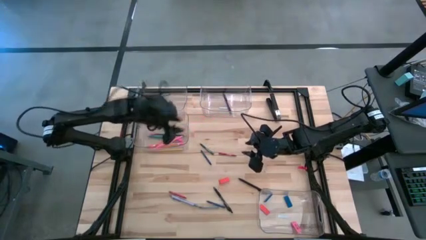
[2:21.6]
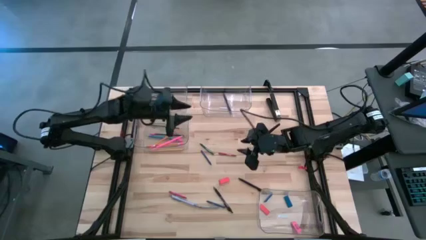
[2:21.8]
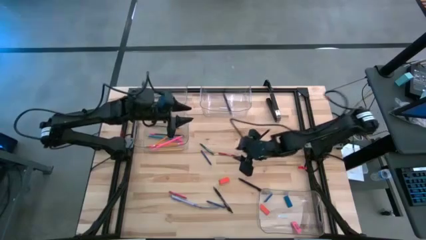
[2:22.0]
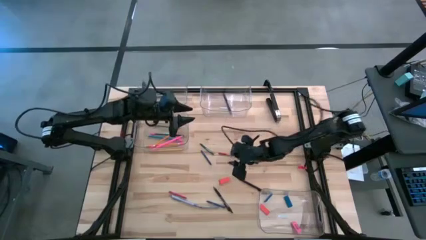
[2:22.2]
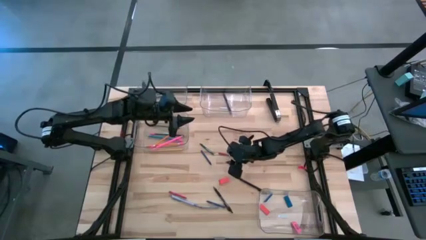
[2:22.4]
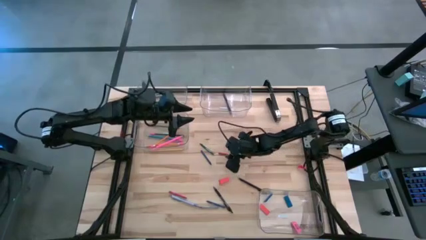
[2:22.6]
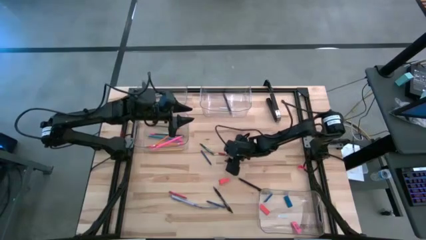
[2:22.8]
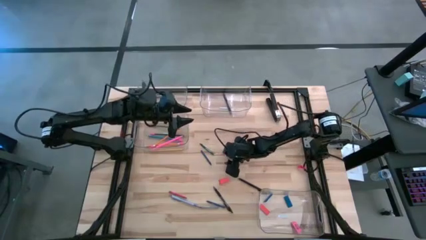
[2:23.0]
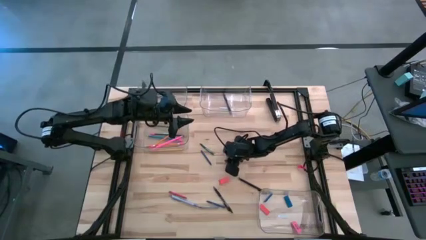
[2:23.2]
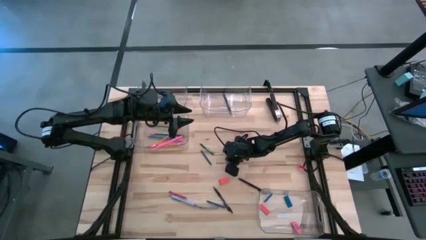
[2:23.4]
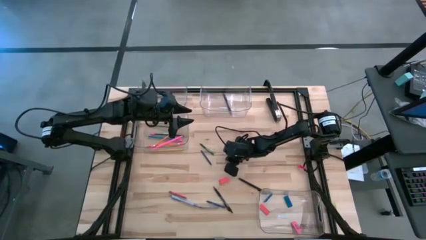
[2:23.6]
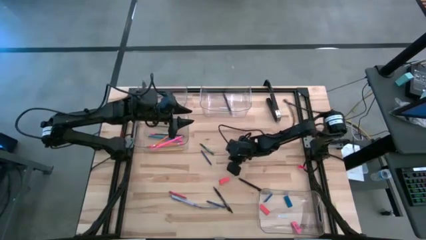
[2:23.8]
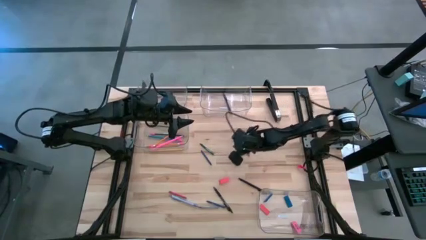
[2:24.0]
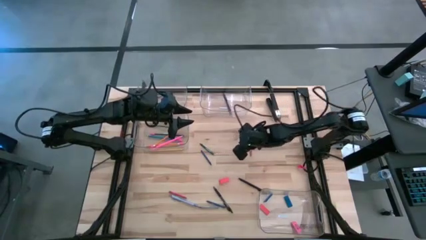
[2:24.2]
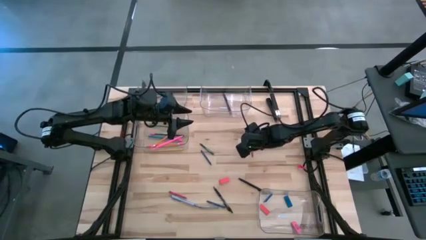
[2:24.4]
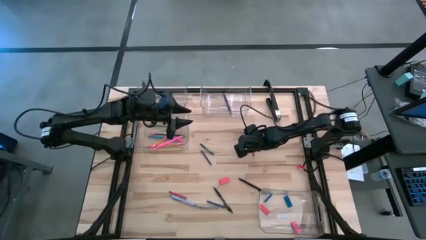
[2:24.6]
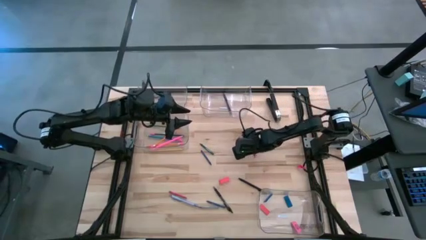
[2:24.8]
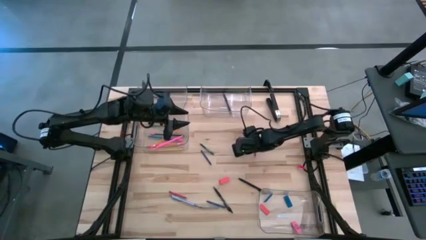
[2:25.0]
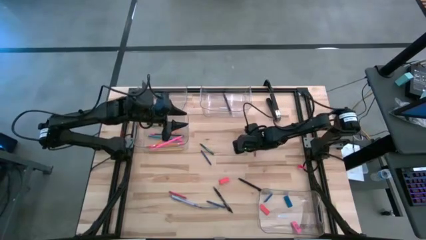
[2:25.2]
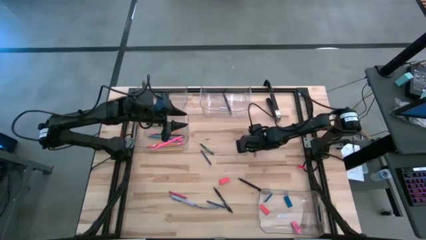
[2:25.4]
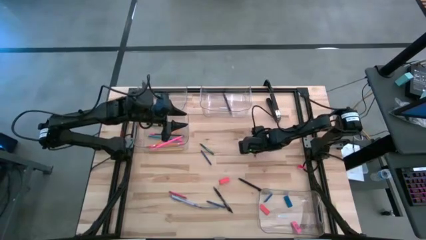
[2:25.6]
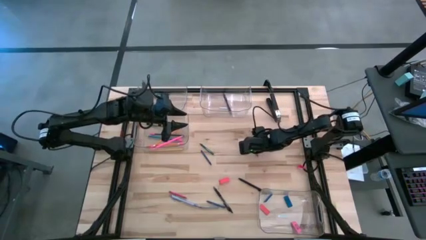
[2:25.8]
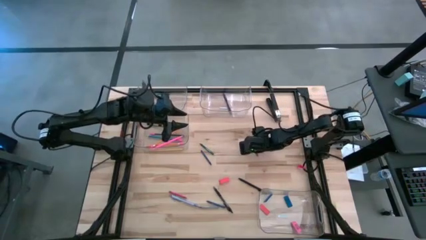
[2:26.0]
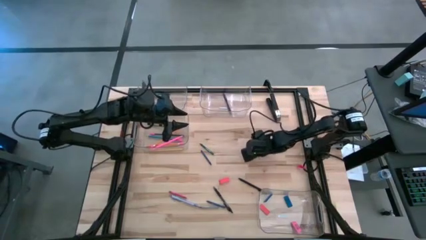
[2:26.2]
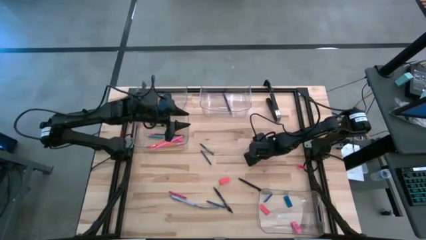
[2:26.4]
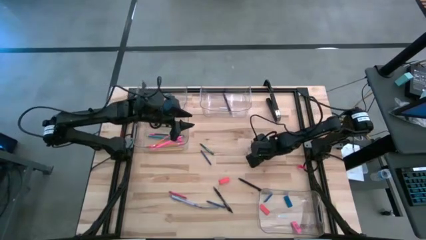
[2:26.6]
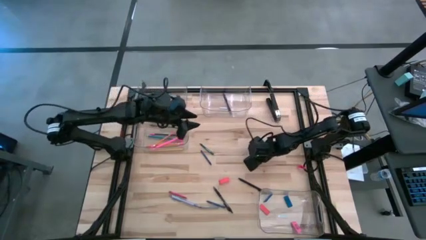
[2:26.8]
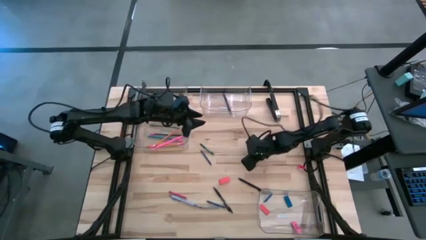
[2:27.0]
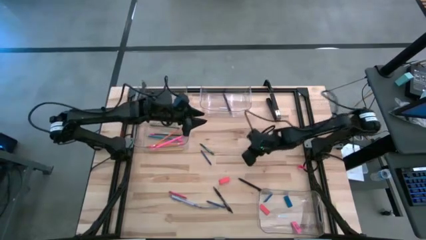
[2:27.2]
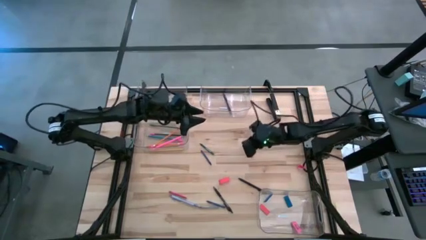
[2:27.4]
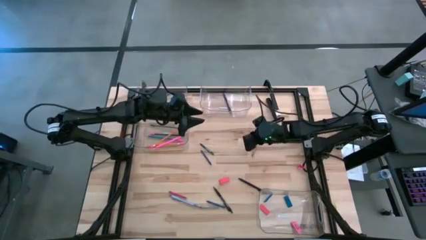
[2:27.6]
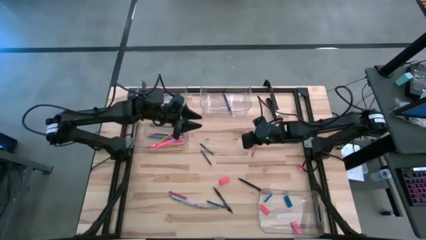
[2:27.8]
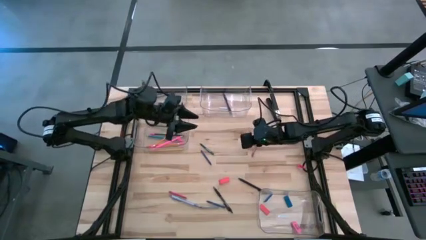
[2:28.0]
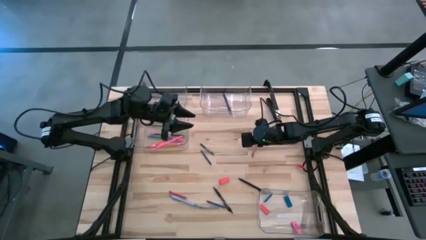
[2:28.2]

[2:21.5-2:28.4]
Task: Sort crayons/erasers/pens/pencils in bins
Put the red crayon into the top left transparent bin

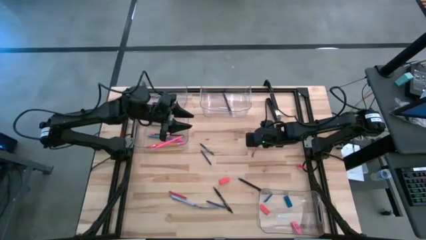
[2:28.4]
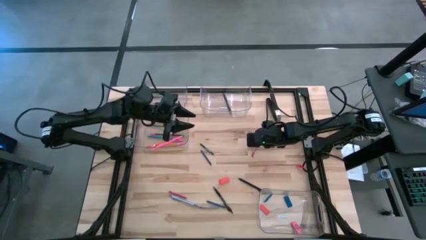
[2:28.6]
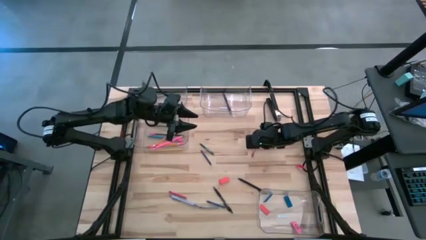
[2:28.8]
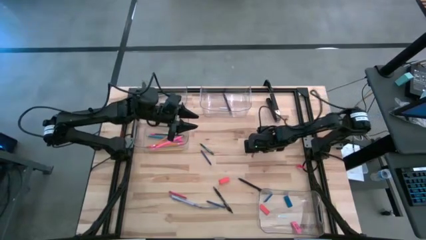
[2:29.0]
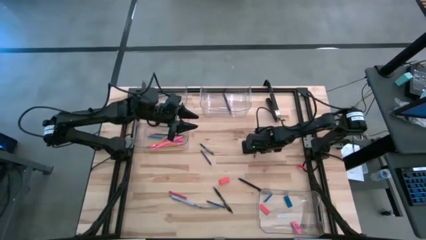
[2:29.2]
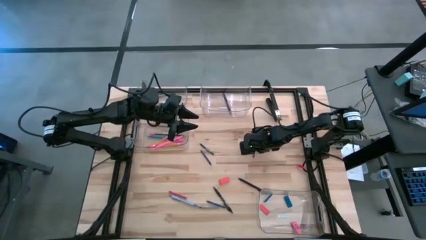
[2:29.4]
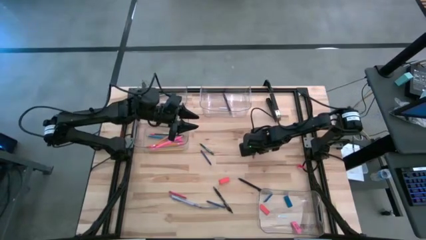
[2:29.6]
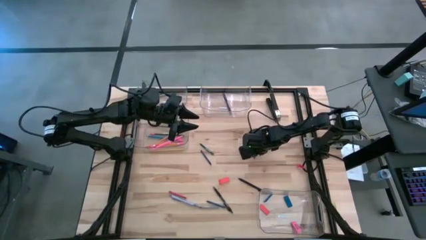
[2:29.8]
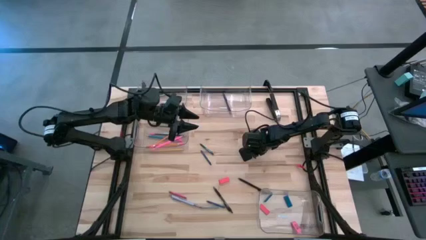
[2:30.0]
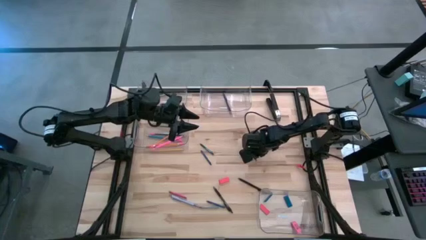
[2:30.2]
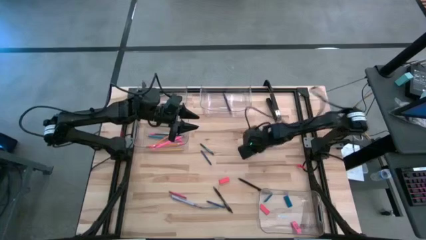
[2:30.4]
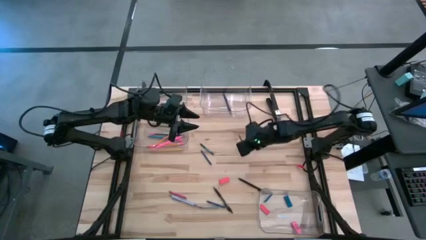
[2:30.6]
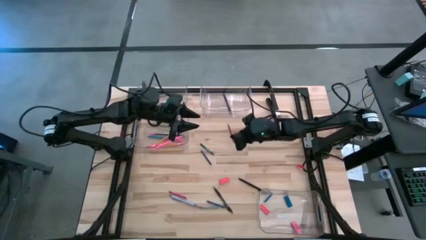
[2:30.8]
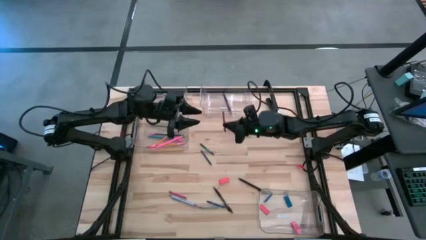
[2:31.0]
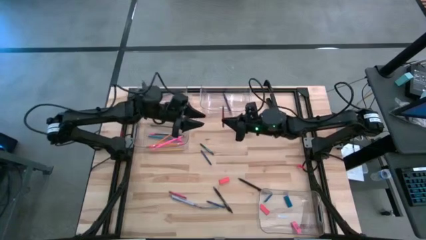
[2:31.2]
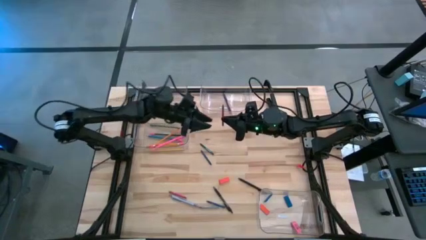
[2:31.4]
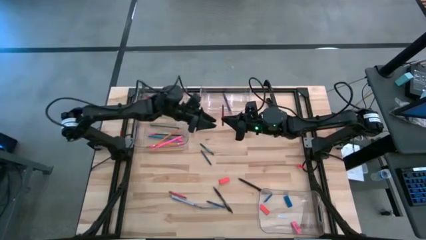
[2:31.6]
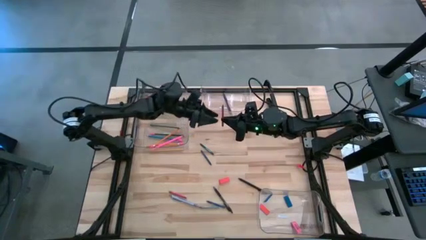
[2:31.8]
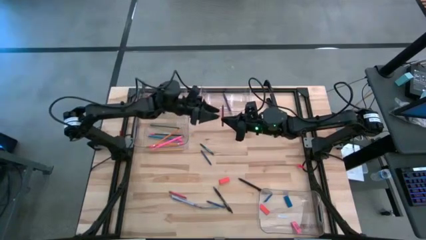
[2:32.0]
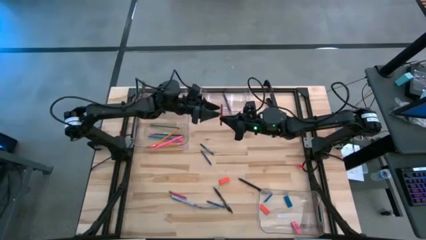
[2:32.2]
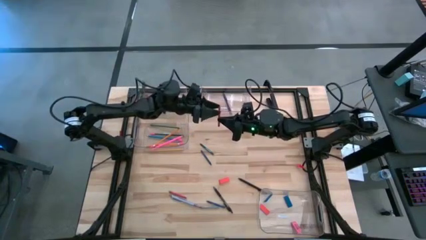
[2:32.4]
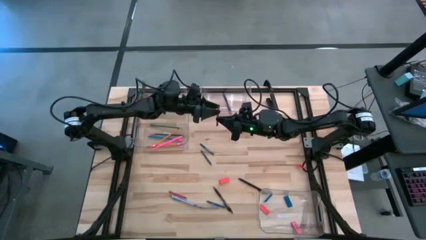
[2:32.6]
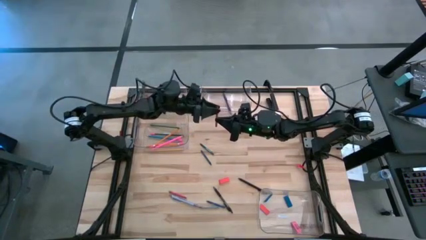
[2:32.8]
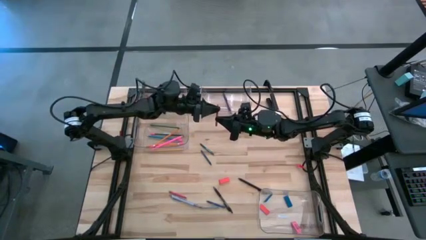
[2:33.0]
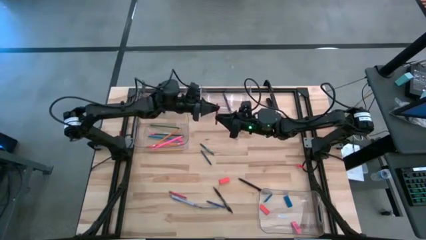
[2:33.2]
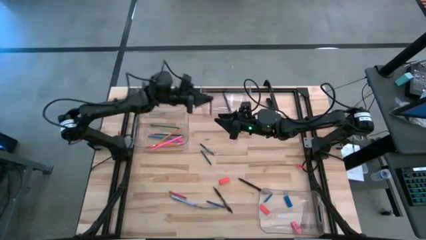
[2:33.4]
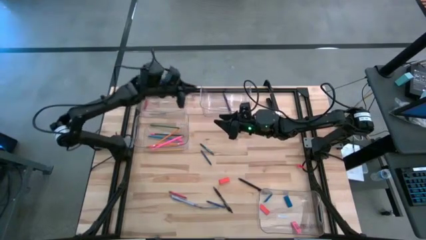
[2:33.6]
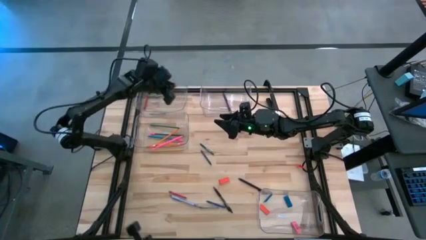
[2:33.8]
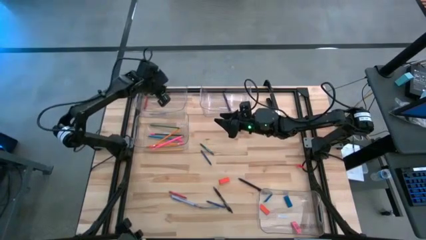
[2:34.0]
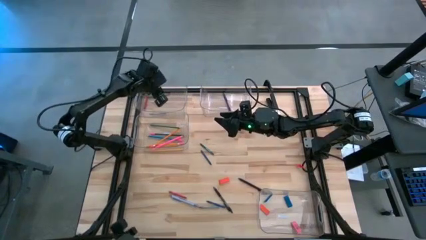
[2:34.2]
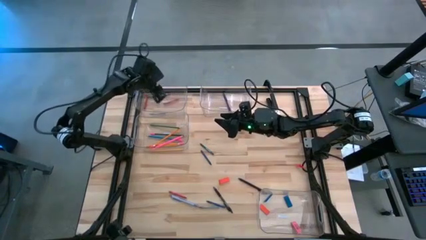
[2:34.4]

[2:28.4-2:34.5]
Put the red crayon into the top left transparent bin

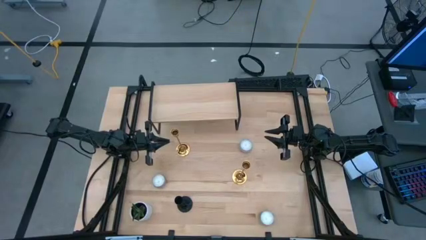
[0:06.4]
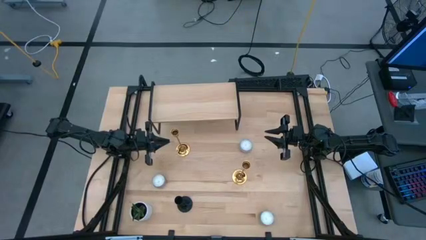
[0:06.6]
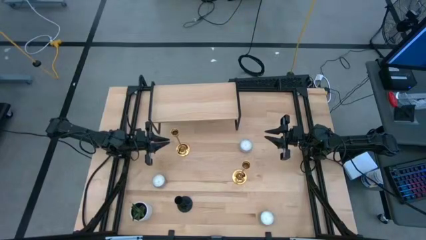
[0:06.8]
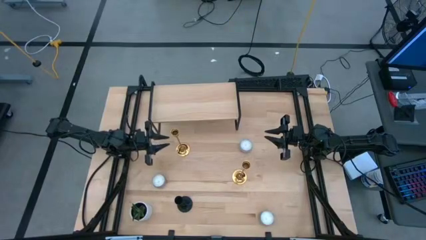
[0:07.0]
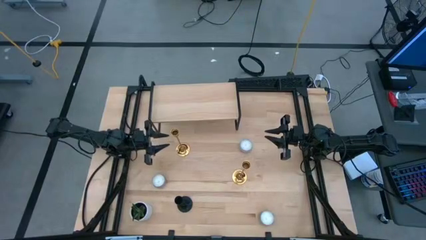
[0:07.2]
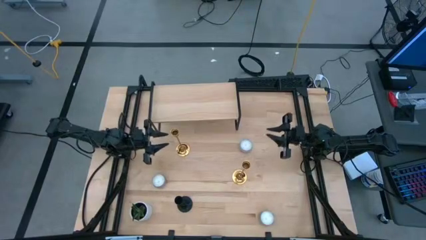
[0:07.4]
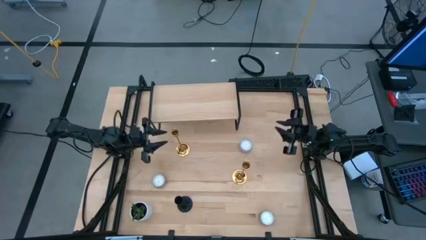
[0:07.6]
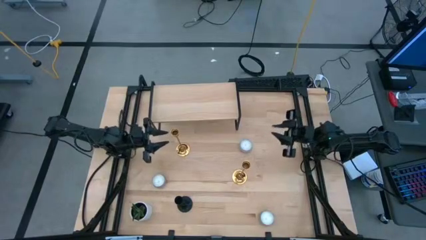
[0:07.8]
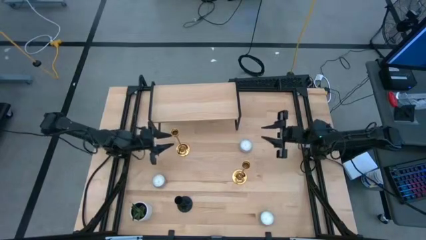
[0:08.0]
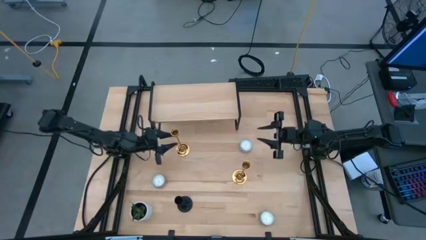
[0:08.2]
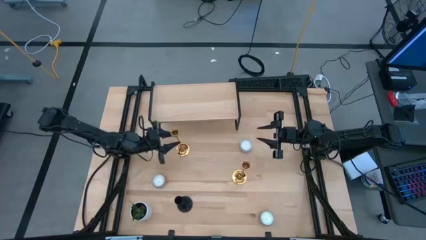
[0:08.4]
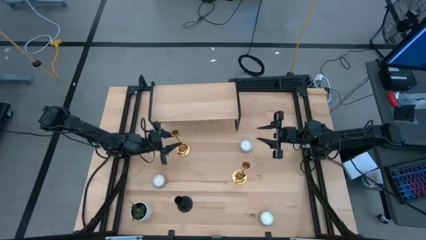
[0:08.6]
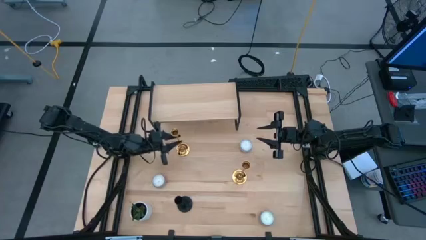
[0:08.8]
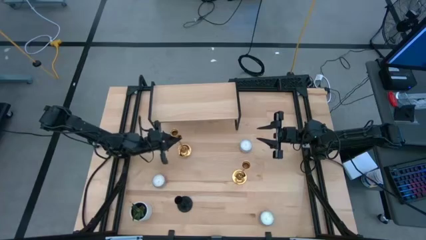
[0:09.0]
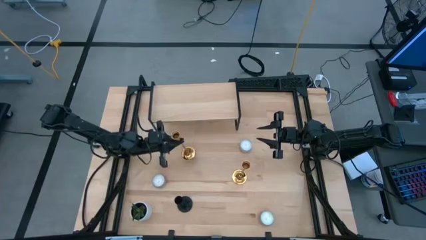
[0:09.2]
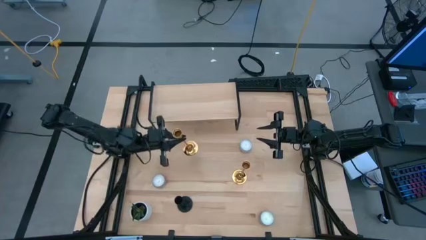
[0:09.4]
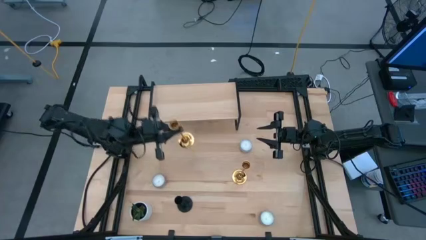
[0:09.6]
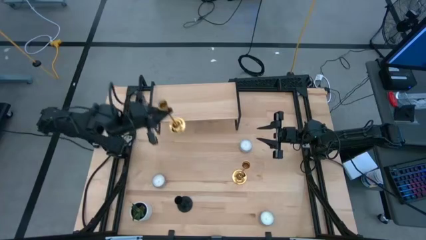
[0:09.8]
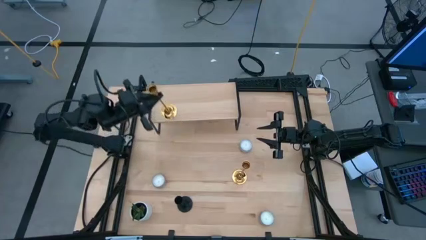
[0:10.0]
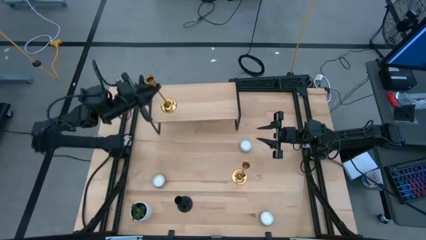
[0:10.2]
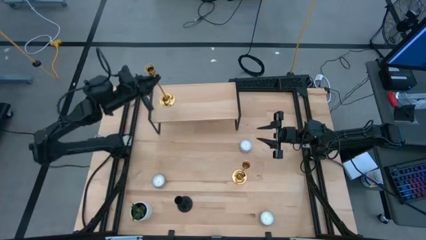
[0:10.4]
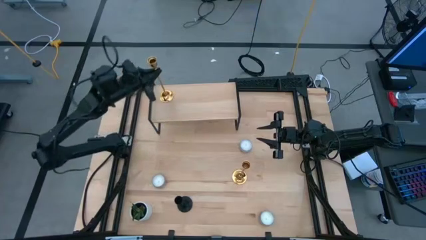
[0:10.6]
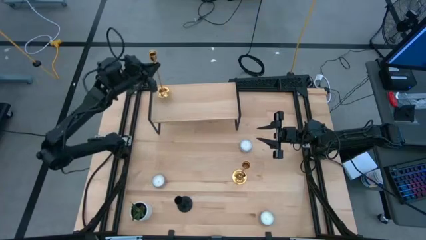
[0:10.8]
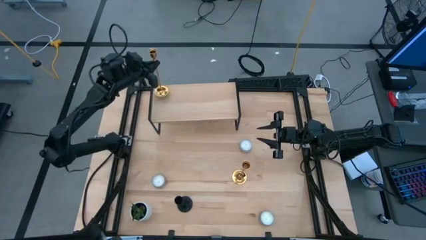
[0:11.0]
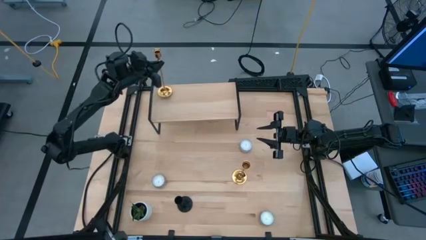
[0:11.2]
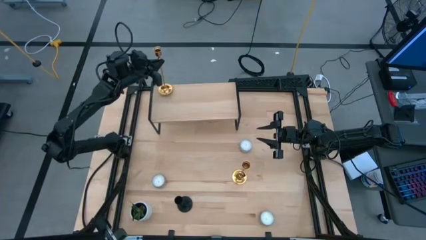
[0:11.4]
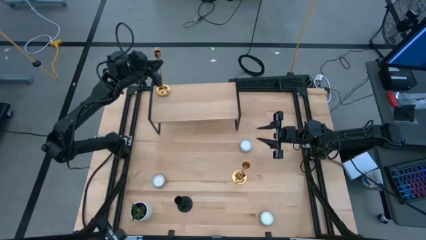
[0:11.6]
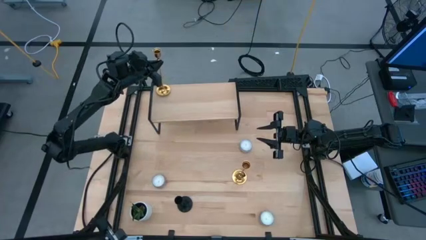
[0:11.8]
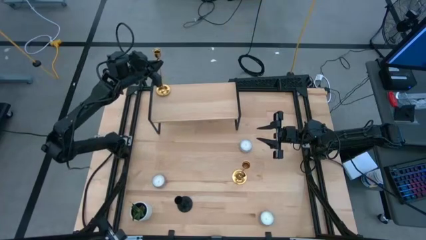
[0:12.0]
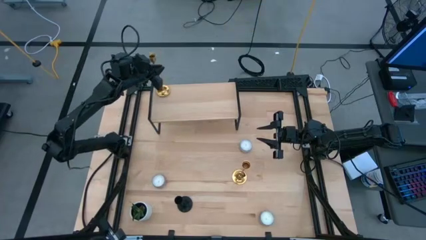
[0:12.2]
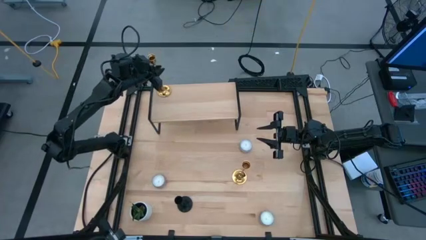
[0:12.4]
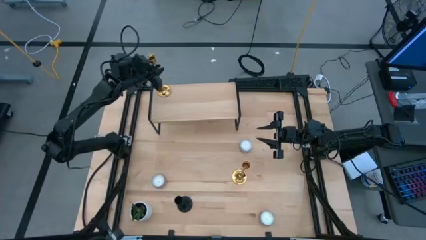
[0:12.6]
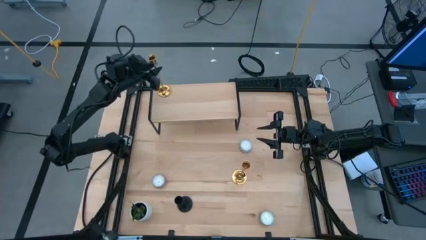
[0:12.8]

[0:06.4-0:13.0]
Task: Pick & Place candle stick holders
Put the left gold candle holder on the shelf
